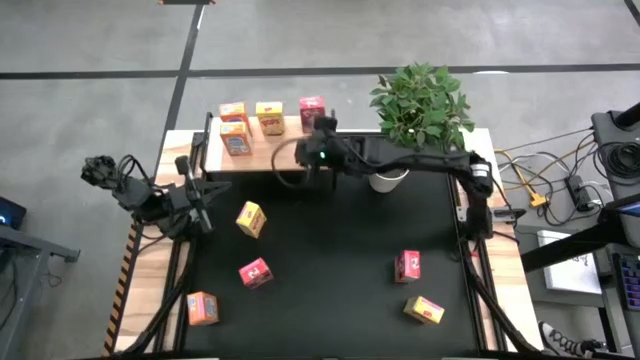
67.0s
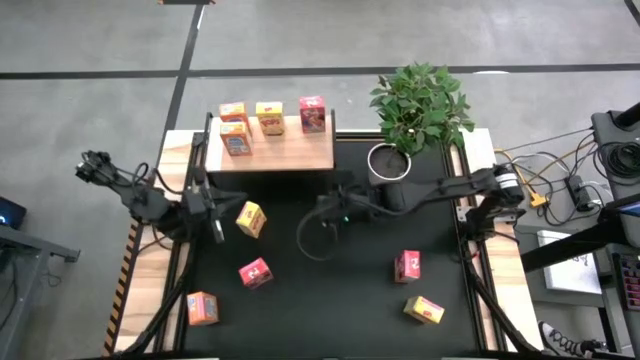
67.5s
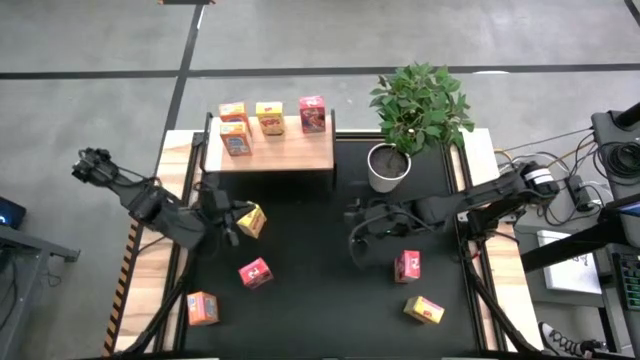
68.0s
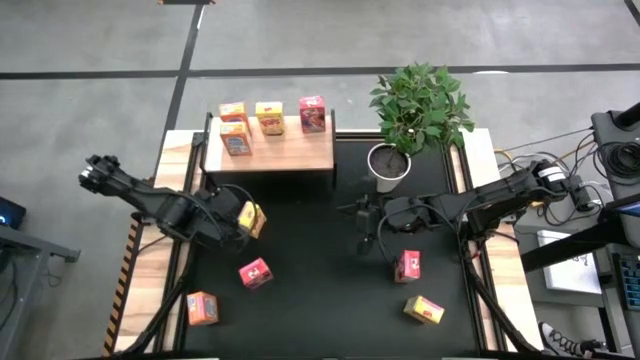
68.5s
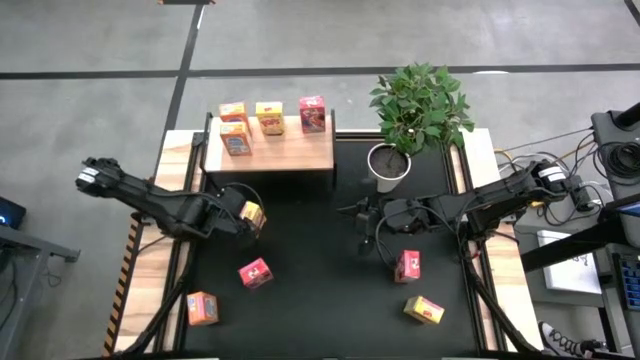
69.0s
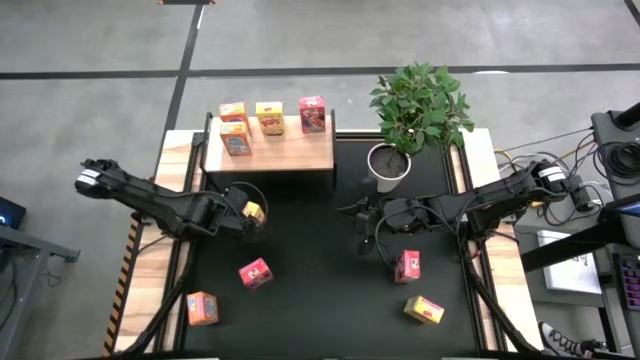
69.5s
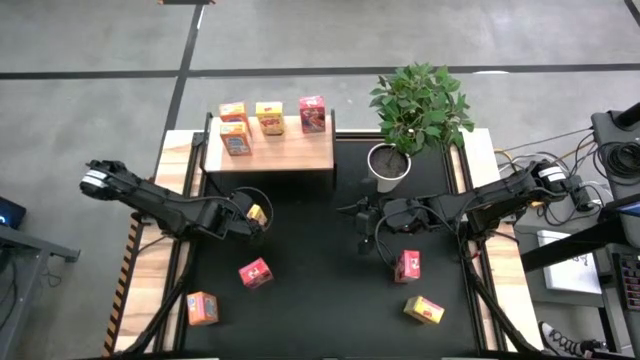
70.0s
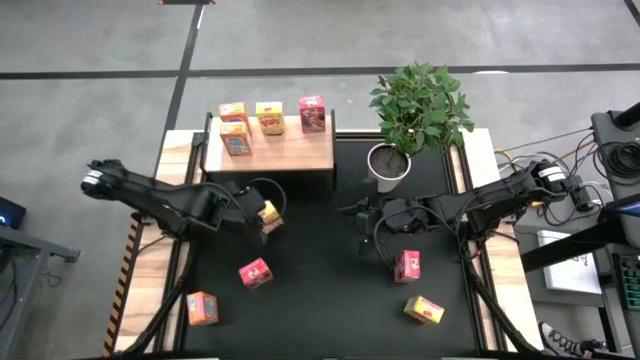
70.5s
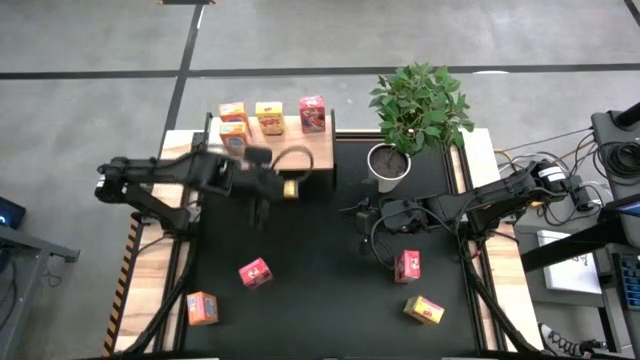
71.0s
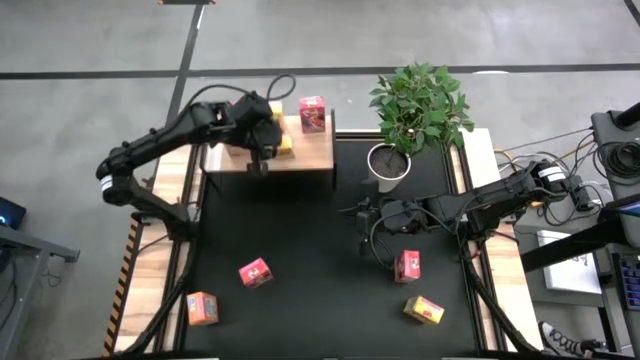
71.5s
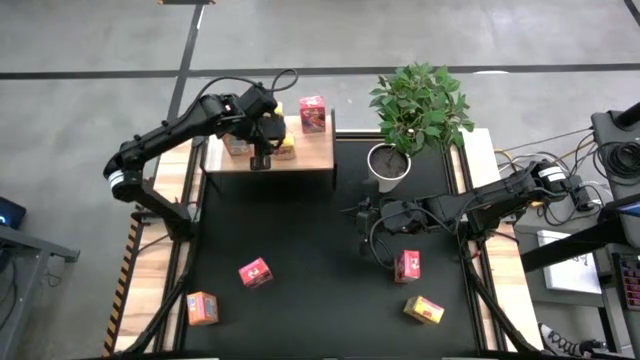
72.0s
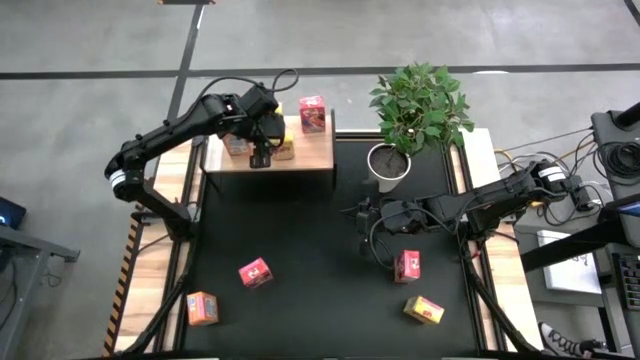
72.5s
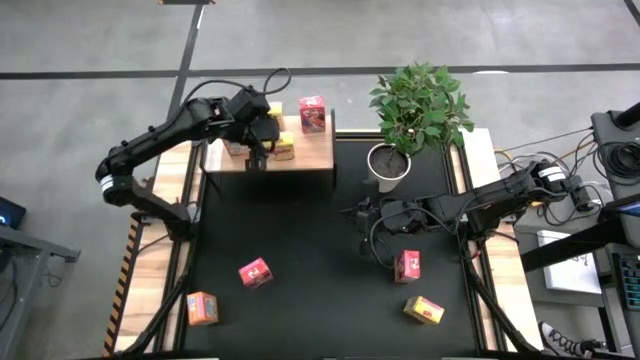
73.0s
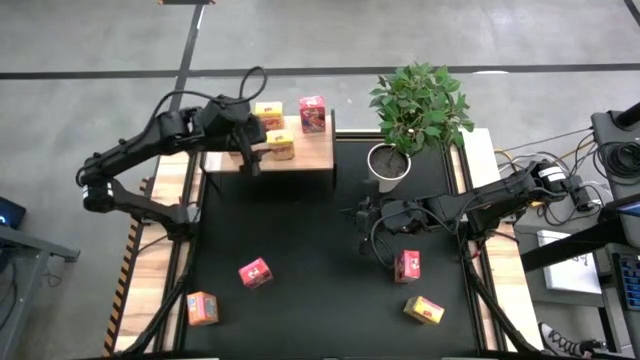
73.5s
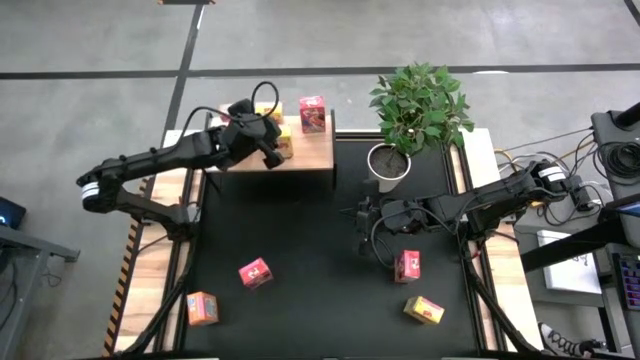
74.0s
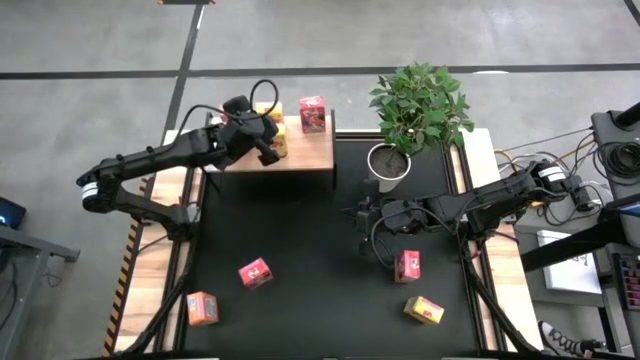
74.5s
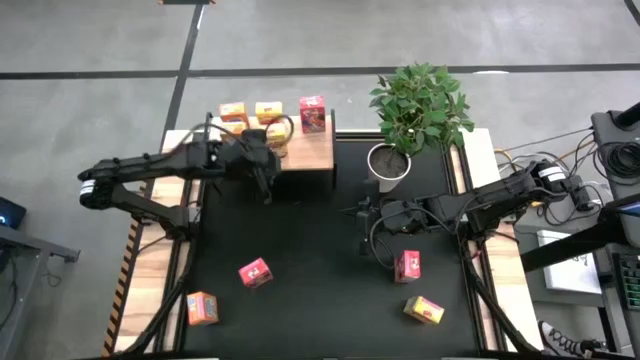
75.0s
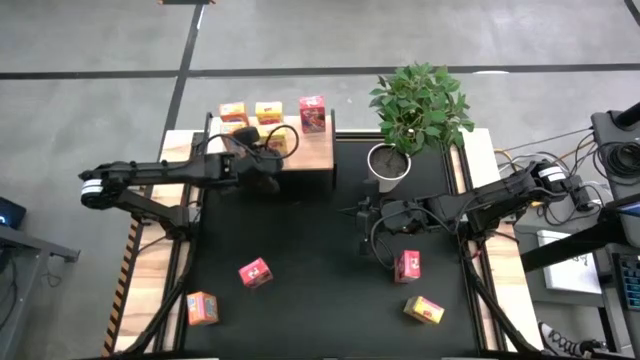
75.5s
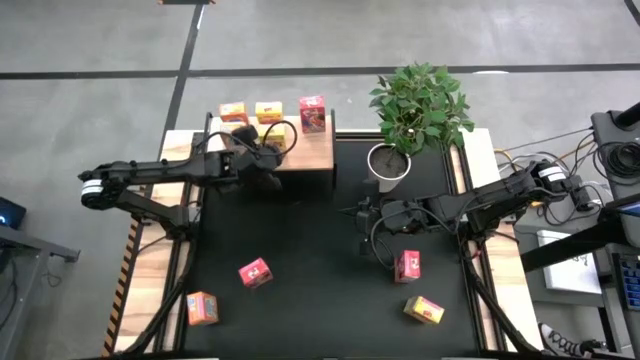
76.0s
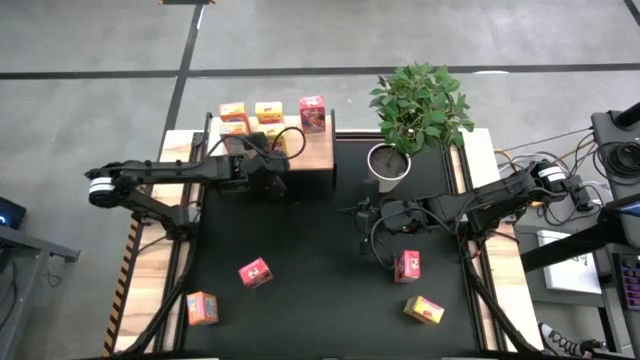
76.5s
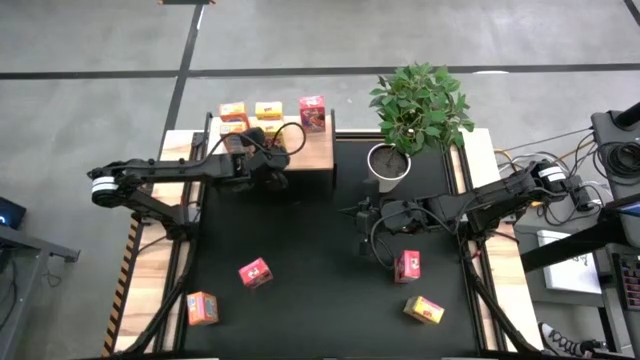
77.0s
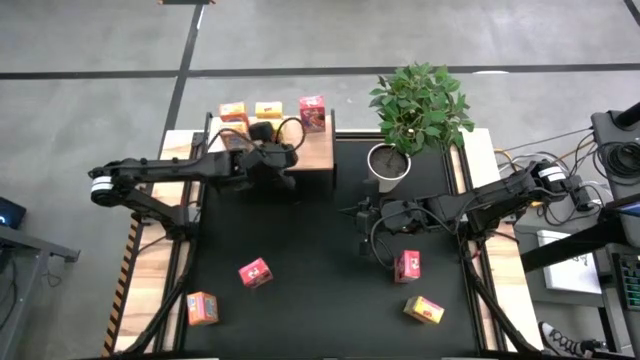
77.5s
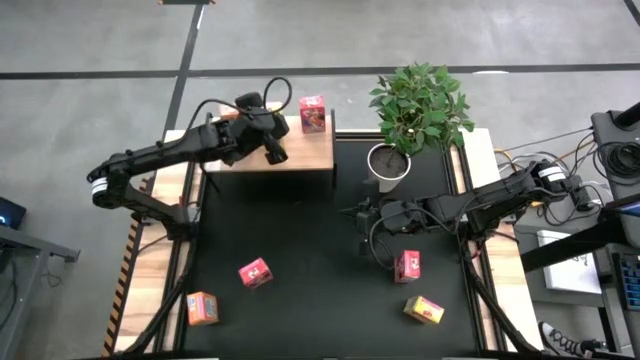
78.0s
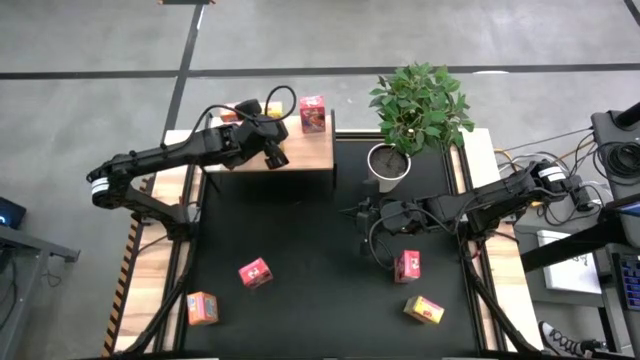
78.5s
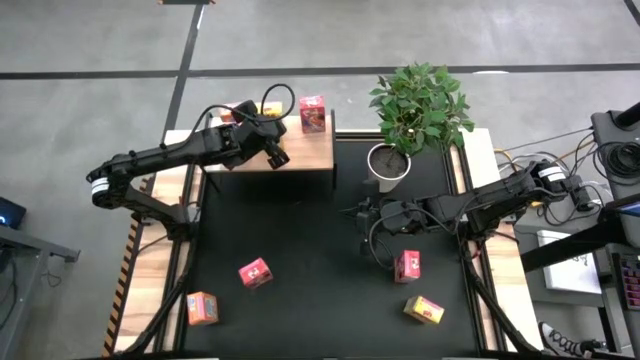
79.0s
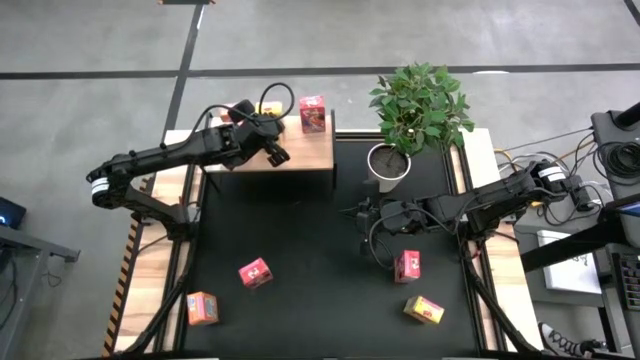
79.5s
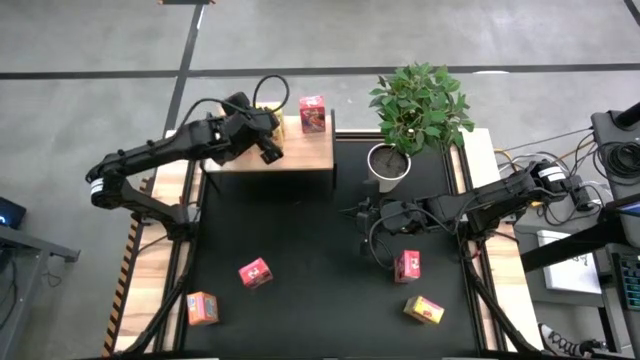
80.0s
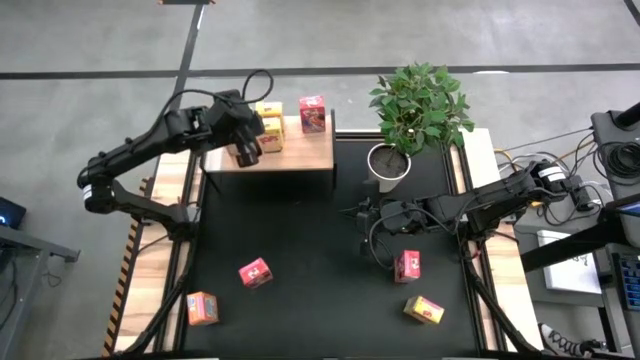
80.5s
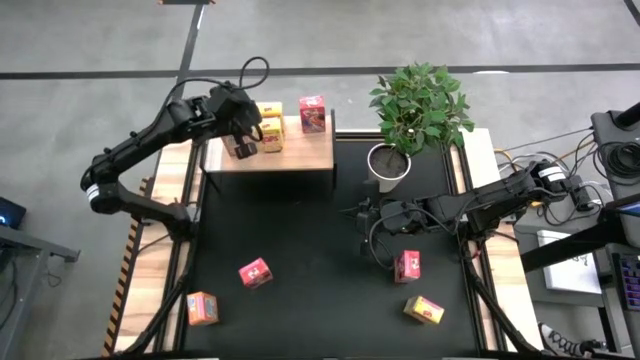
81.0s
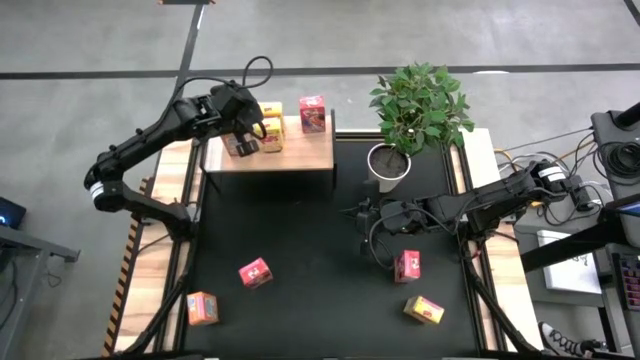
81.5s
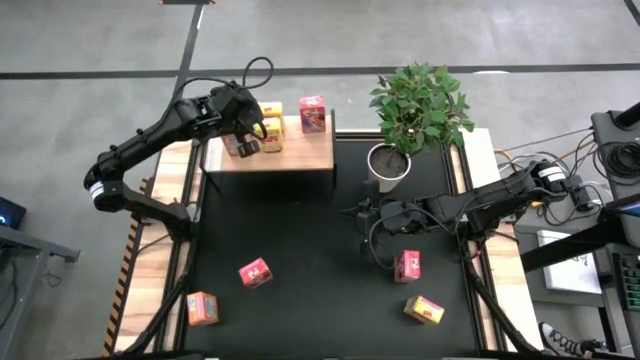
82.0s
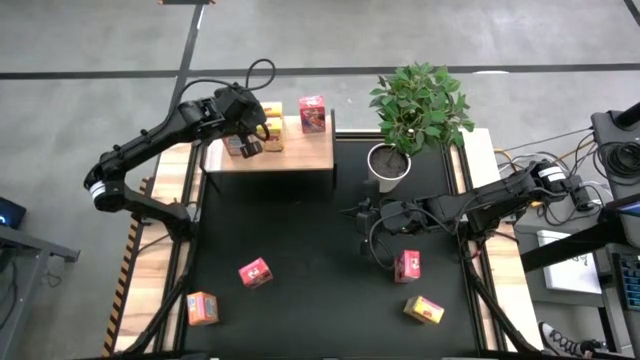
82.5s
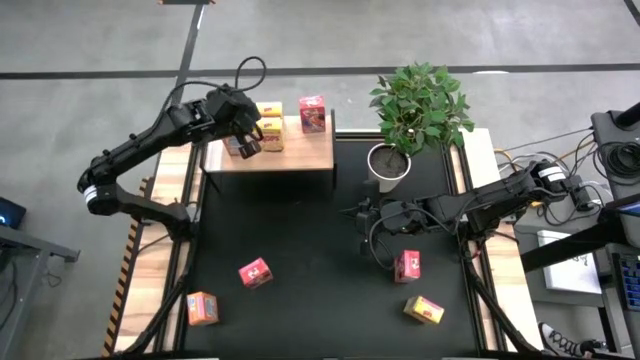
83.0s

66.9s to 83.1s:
Task: Stack cereal on shelf
Put the left yellow cereal box on the shelf

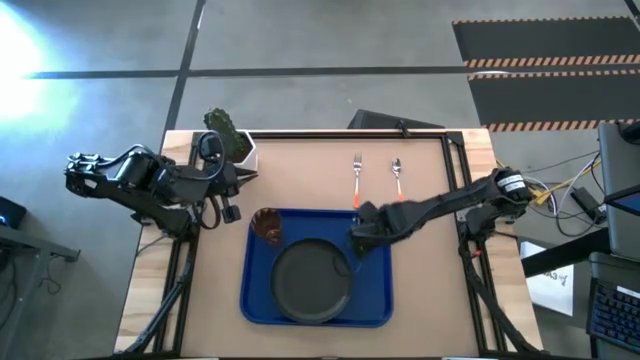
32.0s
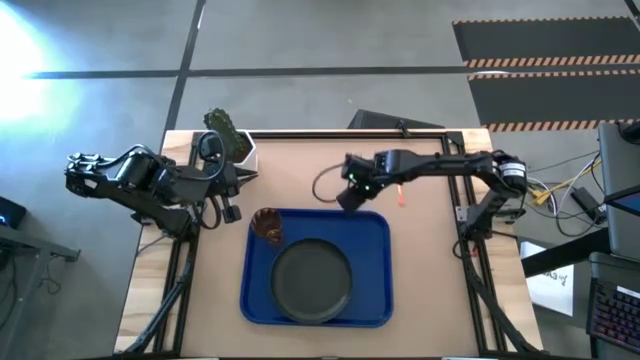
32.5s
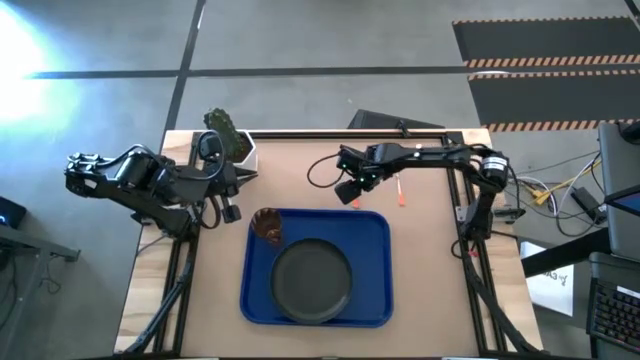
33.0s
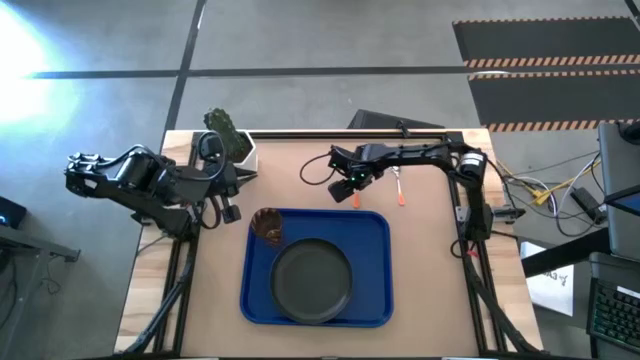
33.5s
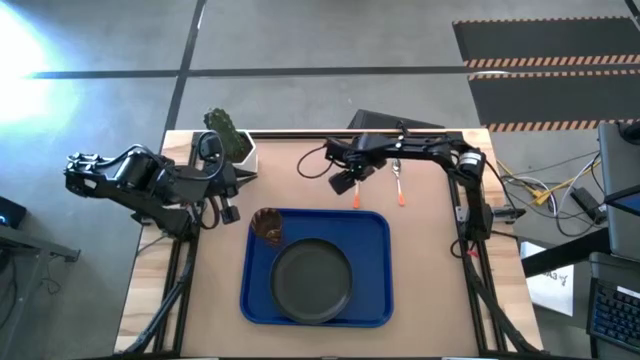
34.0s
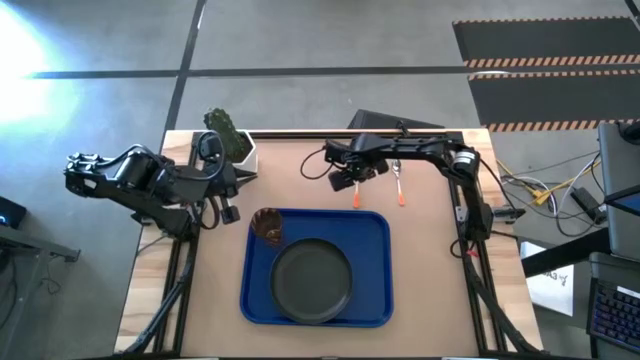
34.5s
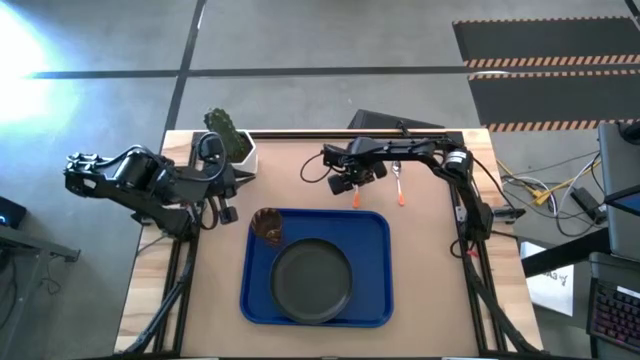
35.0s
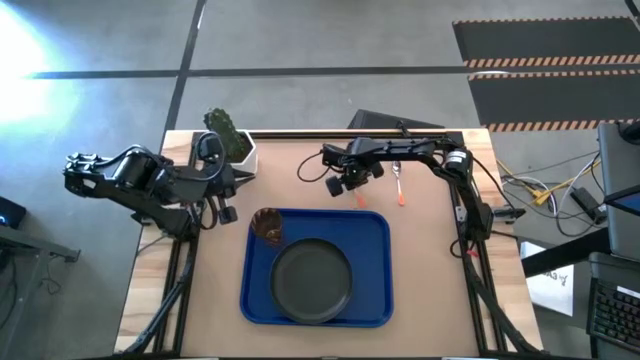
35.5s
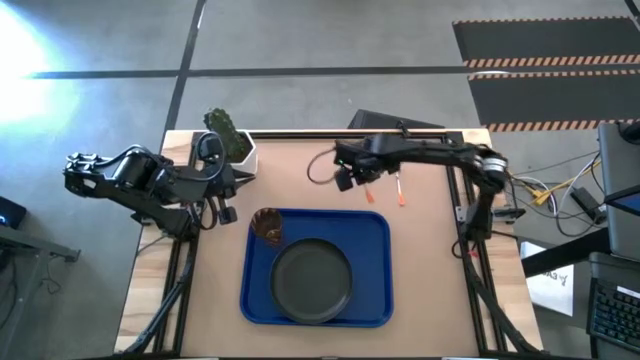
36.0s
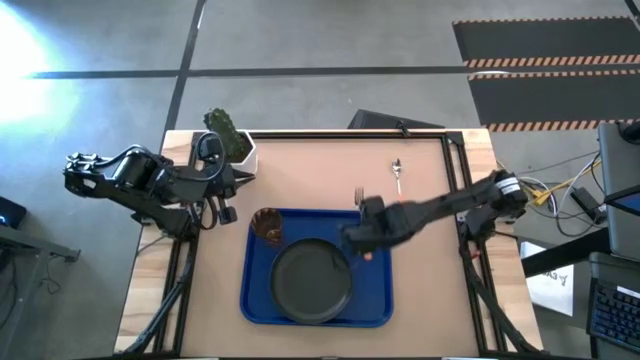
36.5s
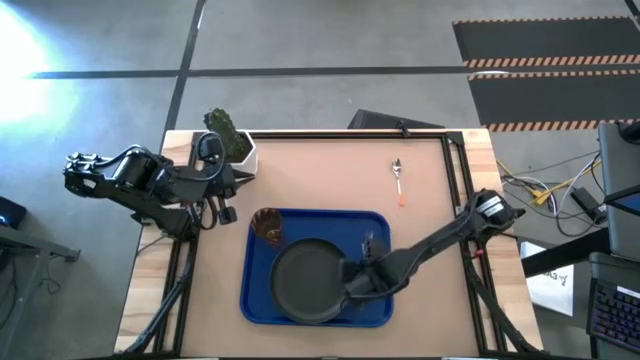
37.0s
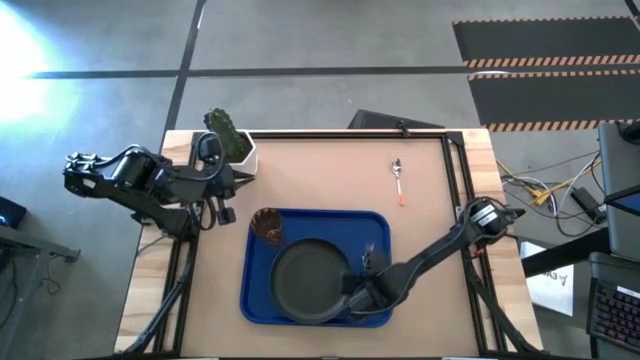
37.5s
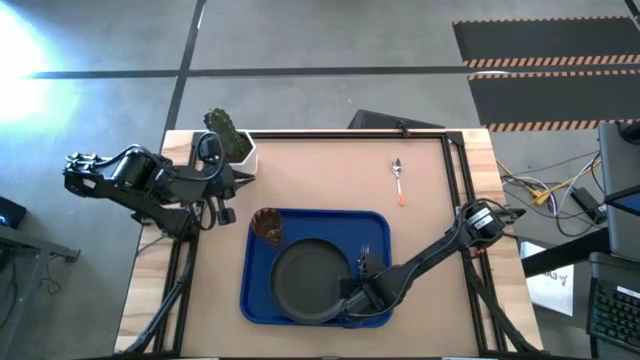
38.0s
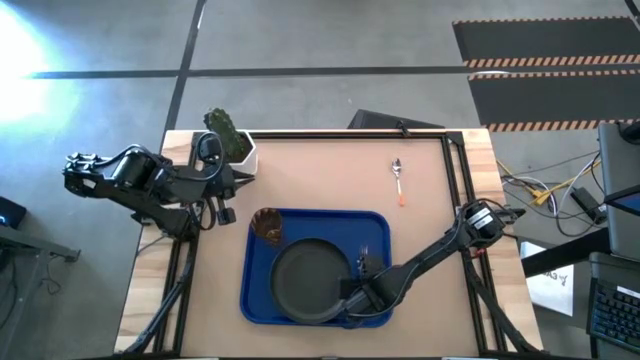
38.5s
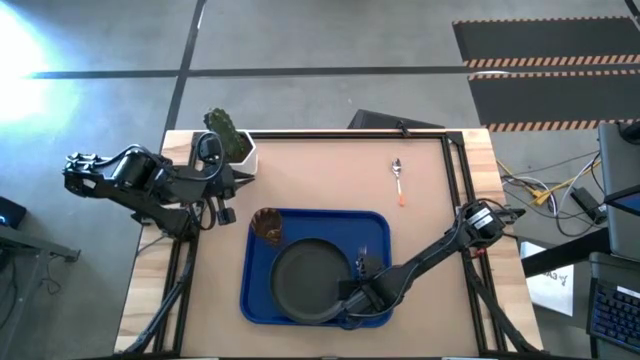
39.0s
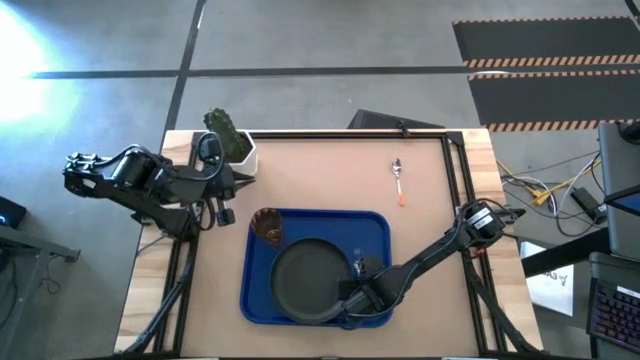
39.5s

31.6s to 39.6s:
Task: Pick and place plate/cup/fork/spoon on tray
Put the orange fork on the blue serving tray to the right side of the black plate
